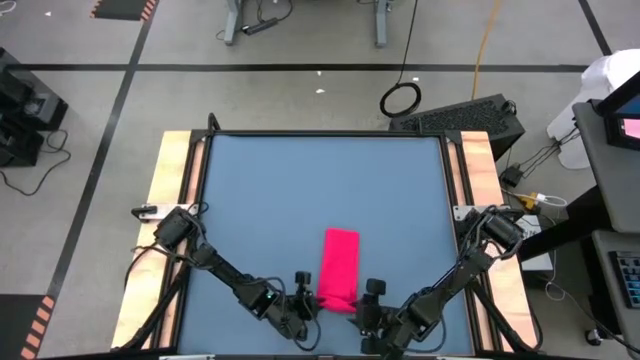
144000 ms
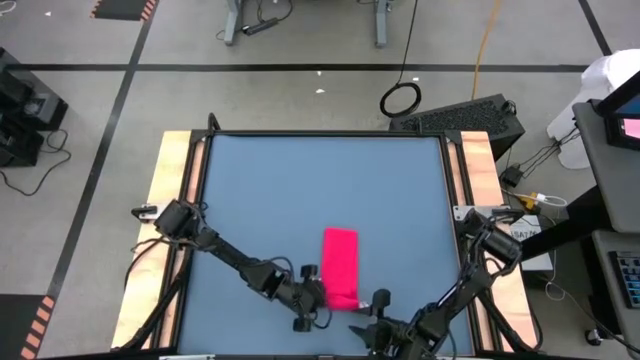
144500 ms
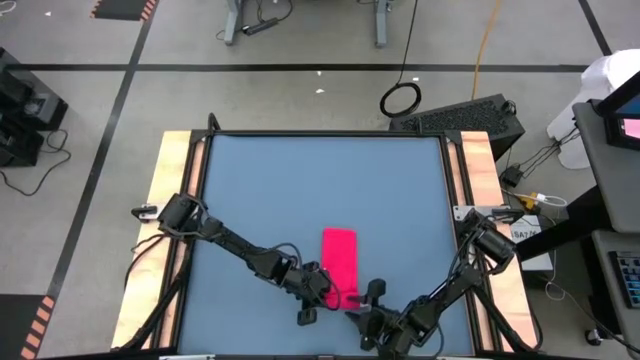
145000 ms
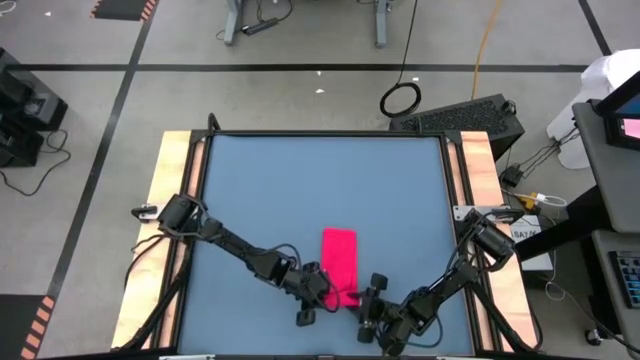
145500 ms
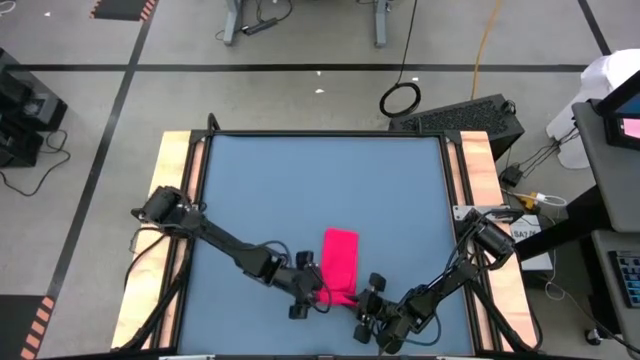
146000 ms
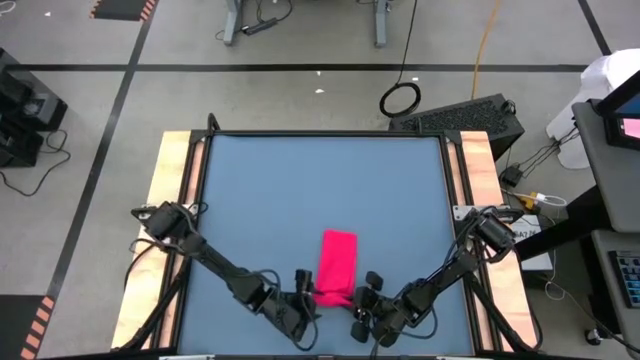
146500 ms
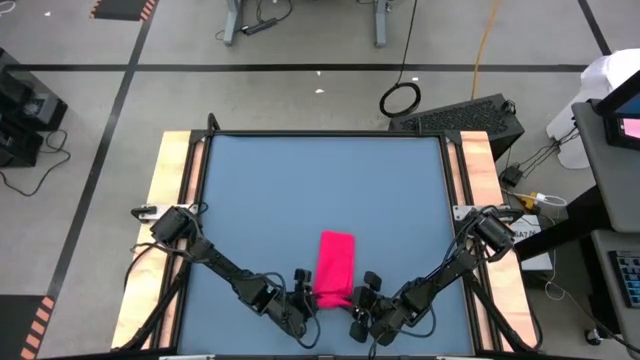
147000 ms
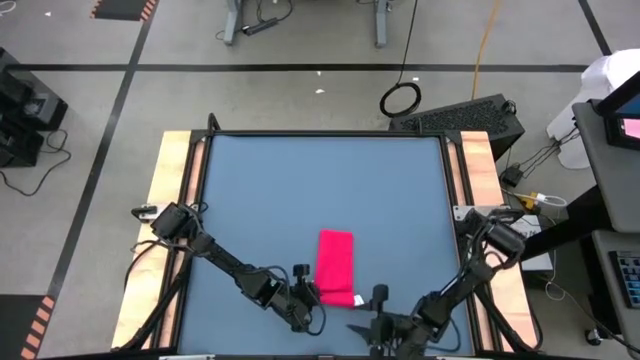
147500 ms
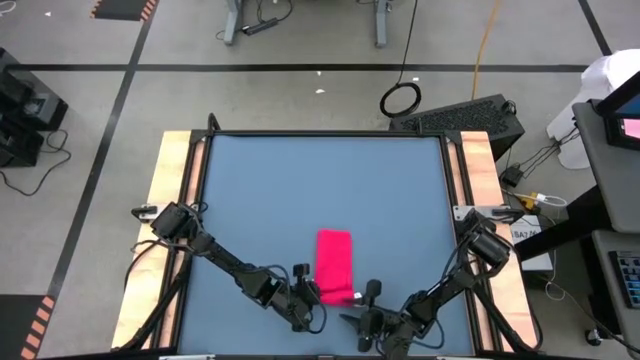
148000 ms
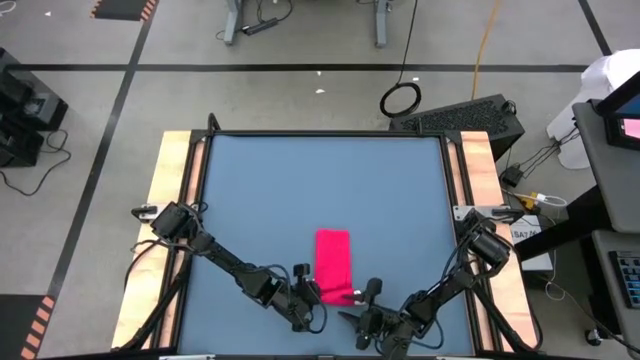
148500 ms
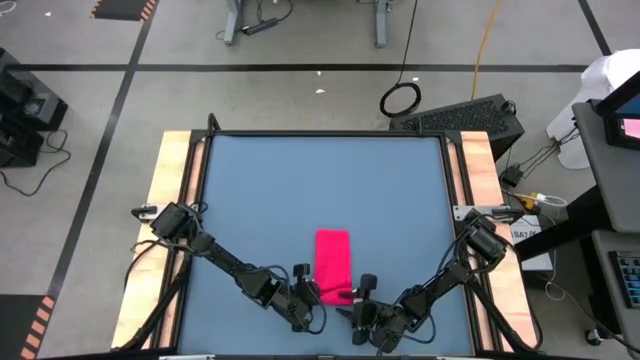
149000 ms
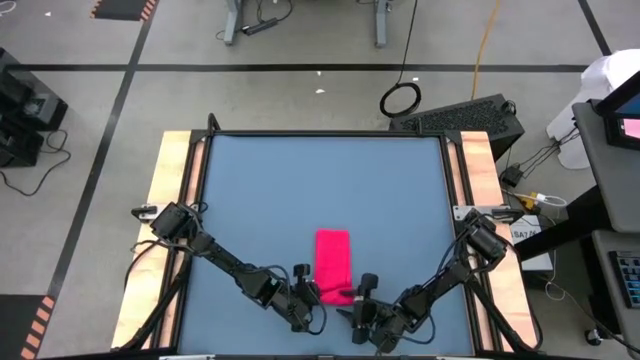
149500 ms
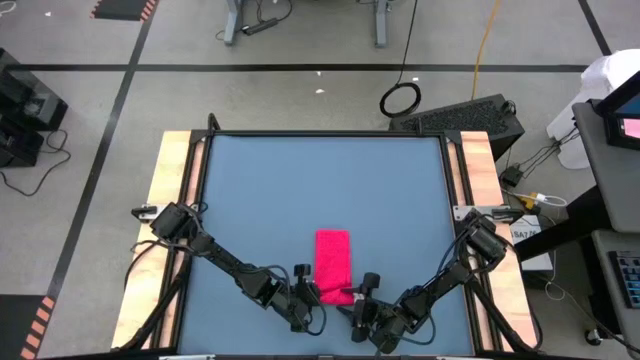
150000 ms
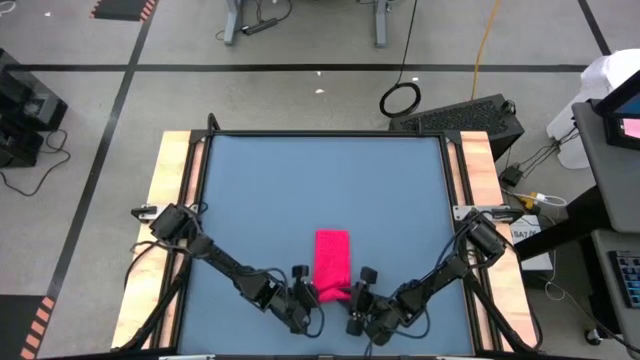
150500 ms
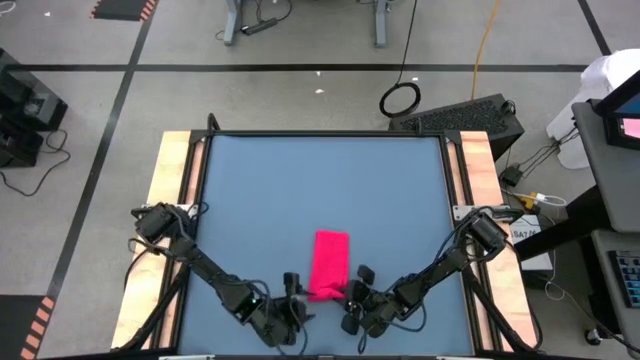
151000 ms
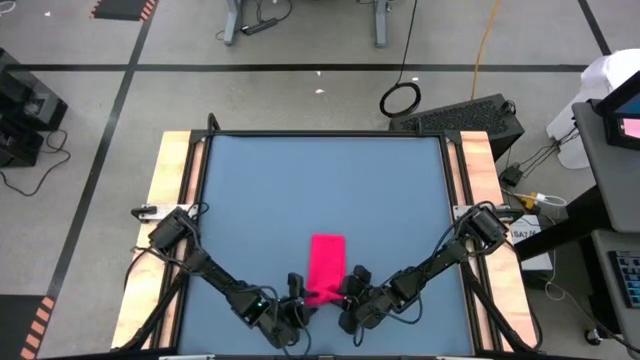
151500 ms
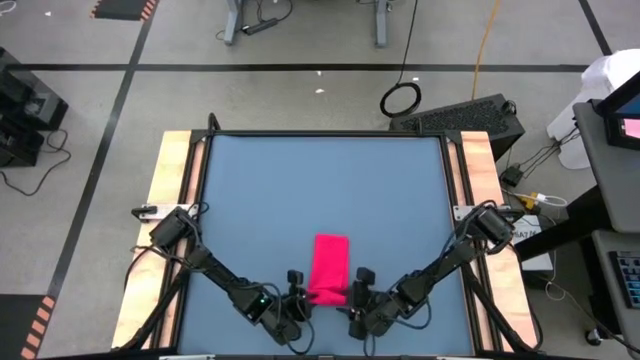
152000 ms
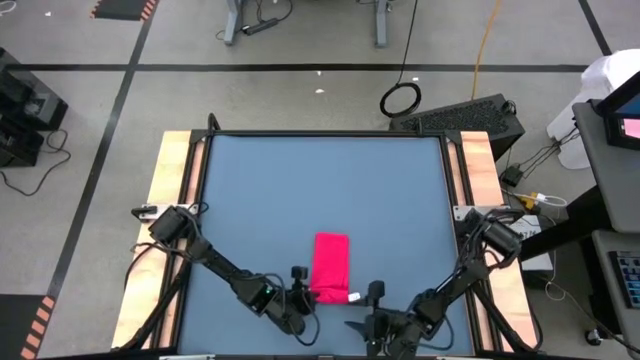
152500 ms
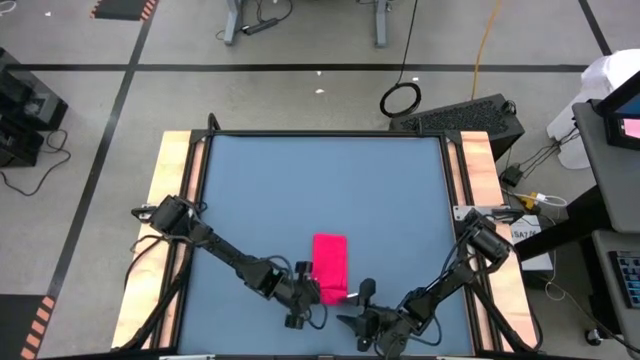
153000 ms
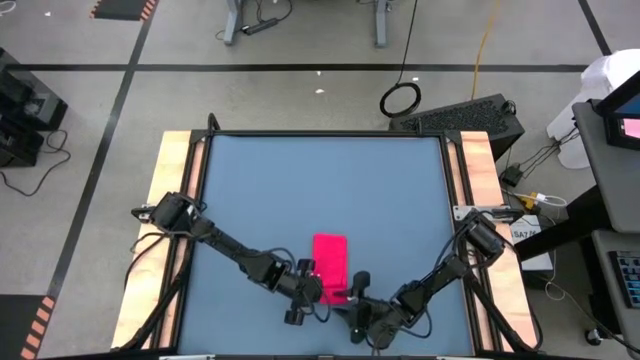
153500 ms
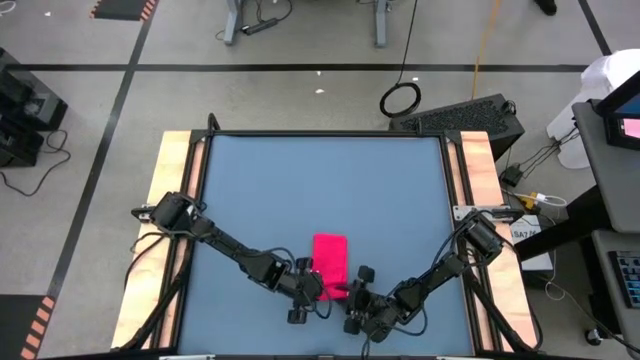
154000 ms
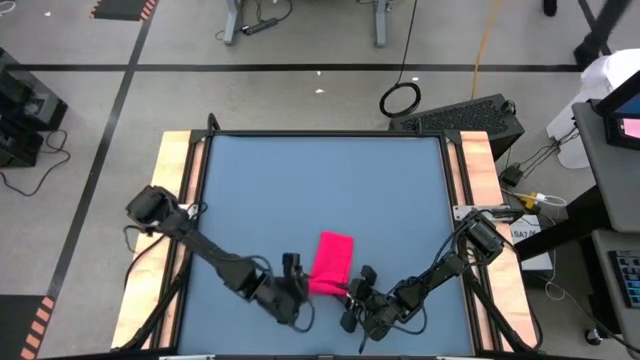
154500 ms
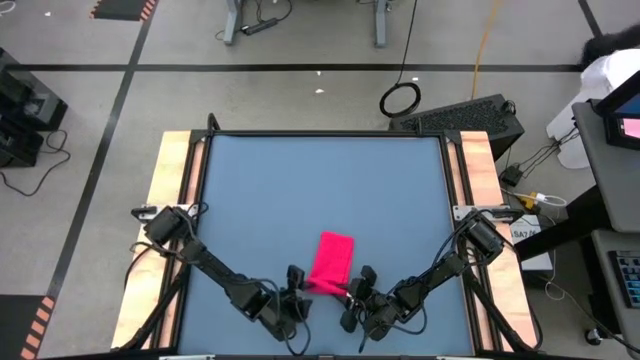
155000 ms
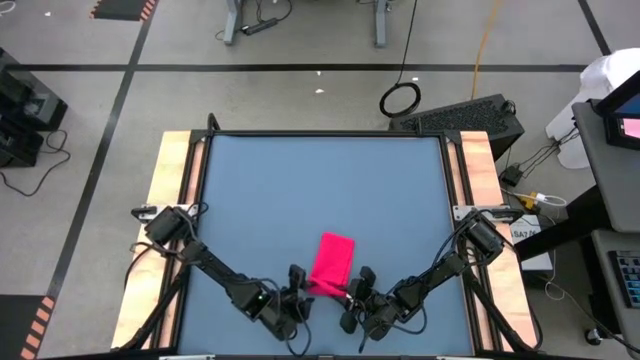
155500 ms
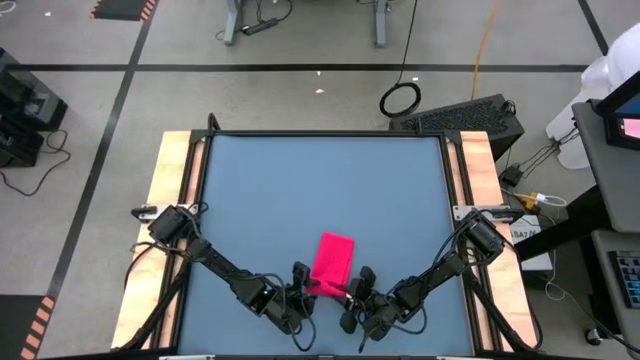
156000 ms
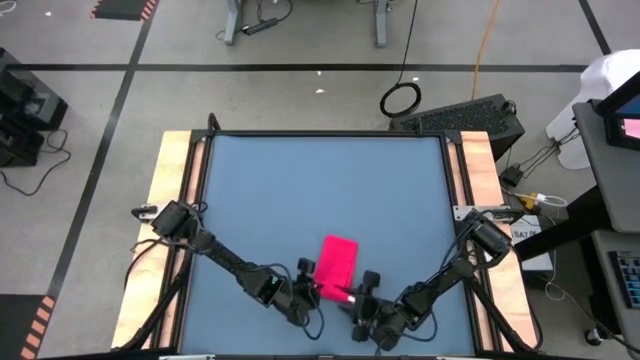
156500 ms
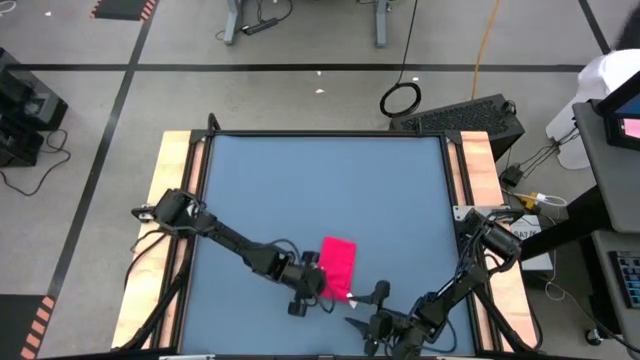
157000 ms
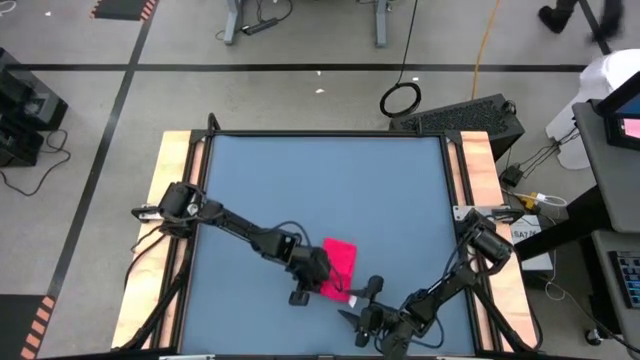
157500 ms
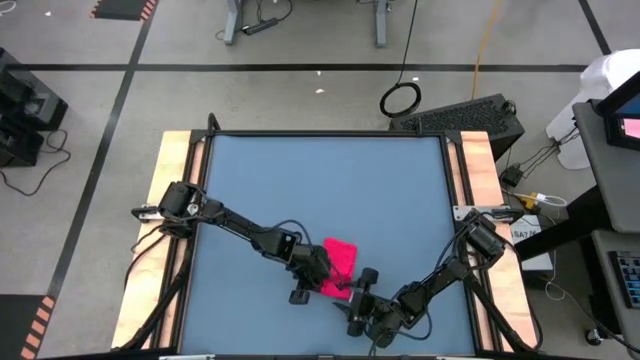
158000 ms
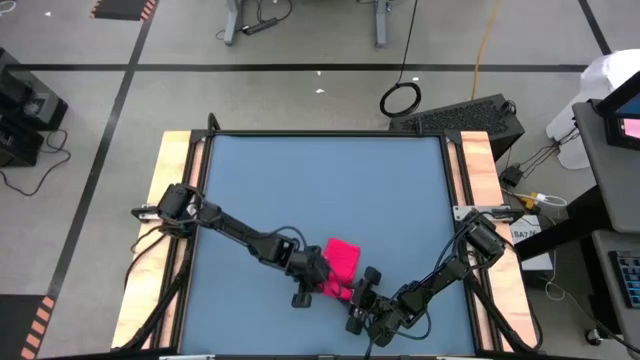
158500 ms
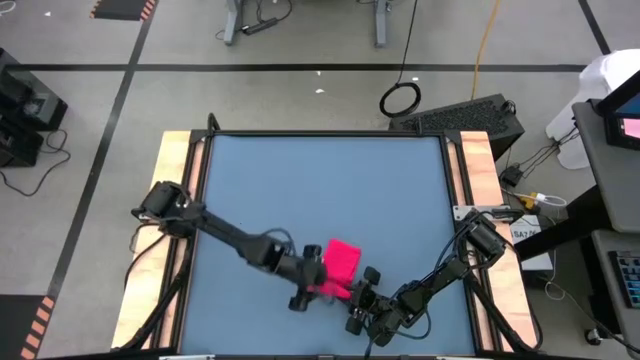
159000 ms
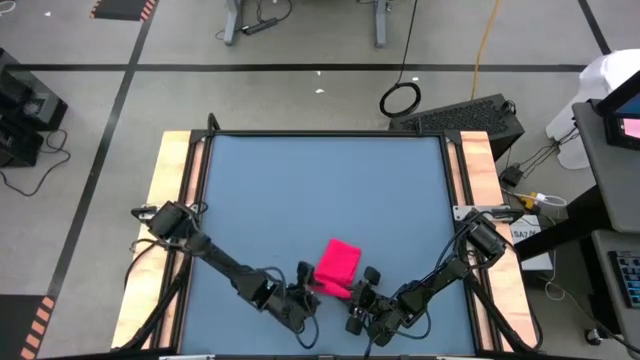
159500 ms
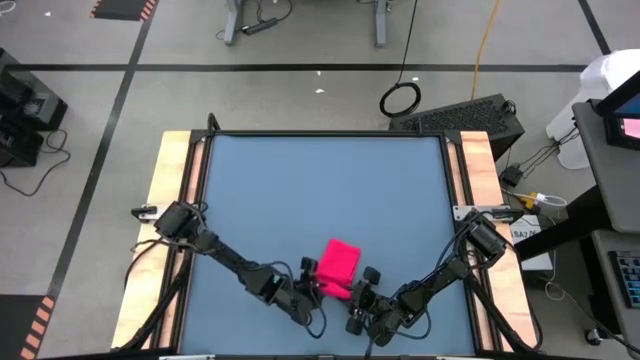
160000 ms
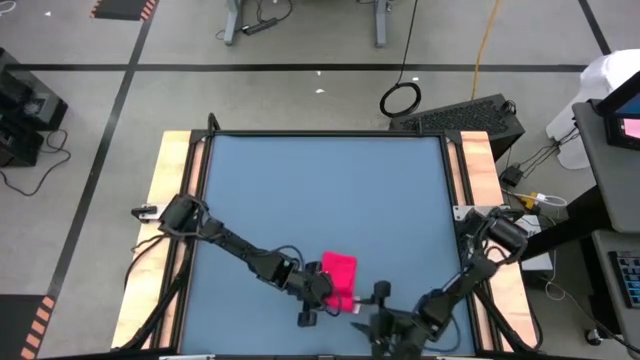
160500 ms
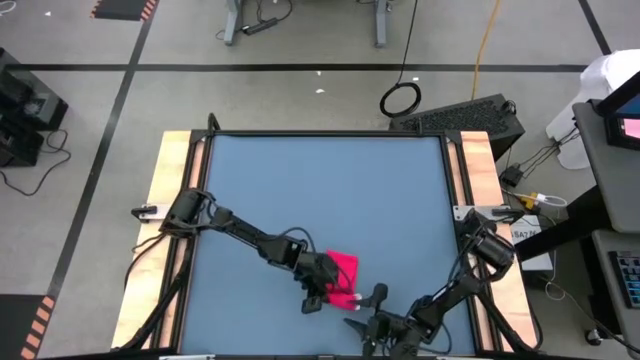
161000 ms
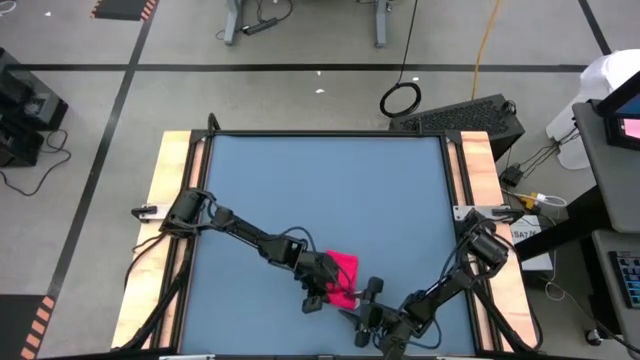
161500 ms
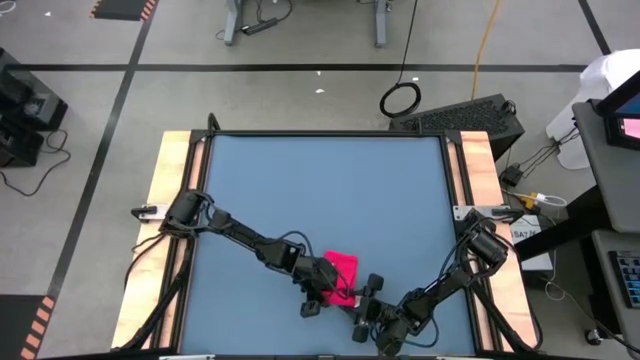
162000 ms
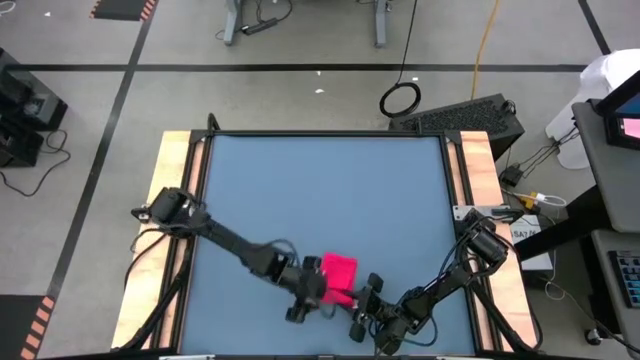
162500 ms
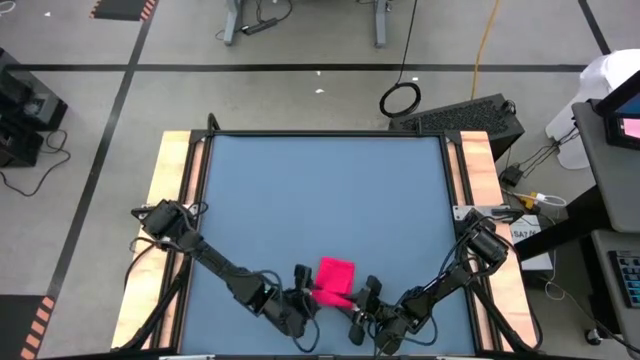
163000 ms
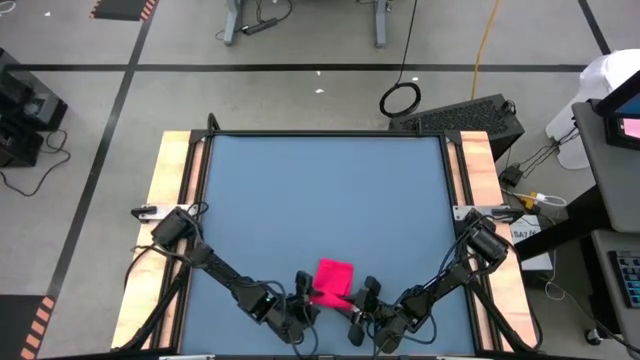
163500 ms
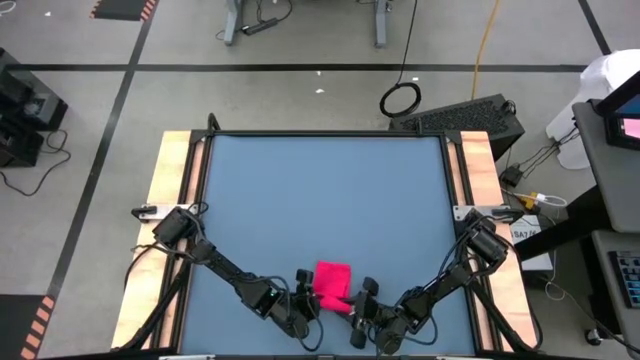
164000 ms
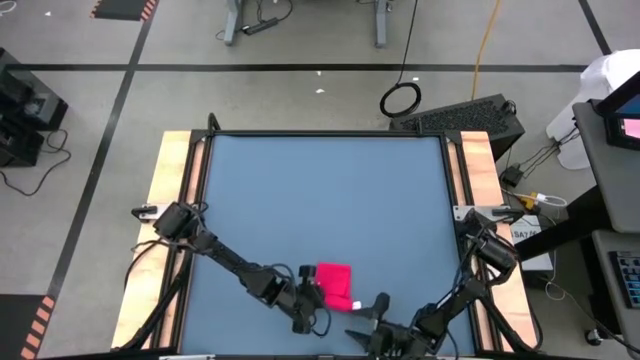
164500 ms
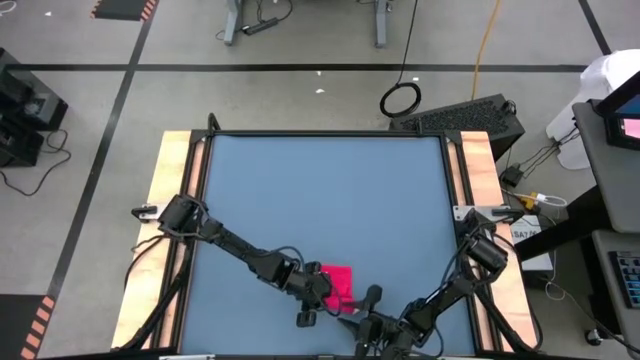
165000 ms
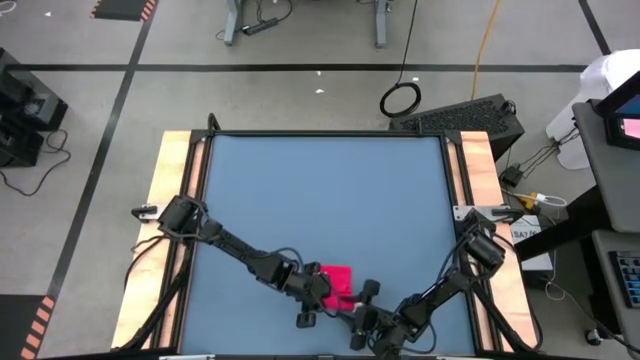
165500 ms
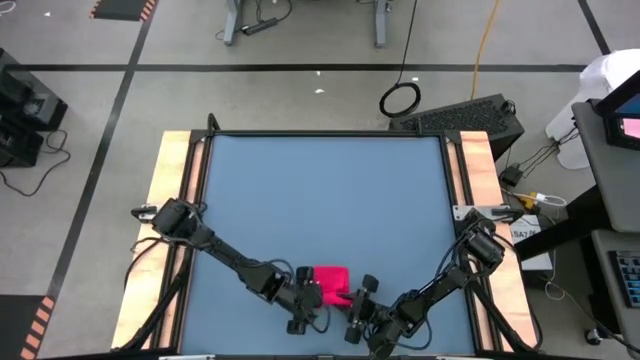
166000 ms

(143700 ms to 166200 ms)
Task: Roll towel
Roll the red towel
